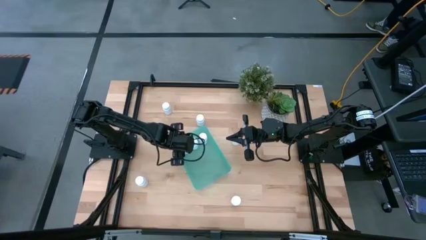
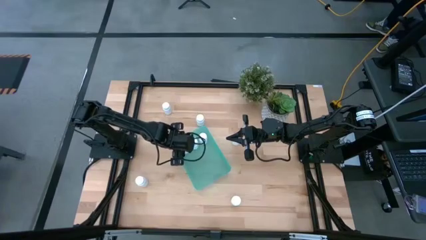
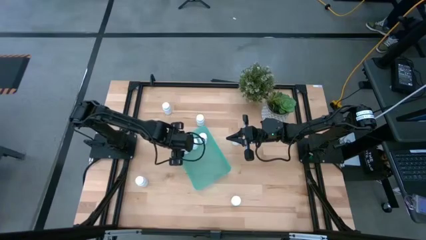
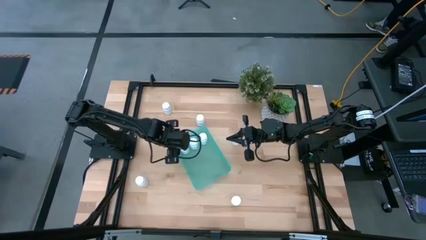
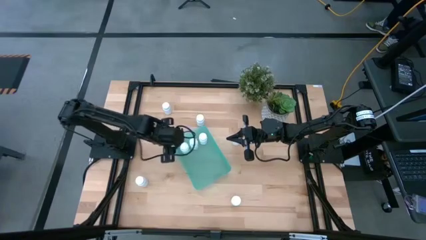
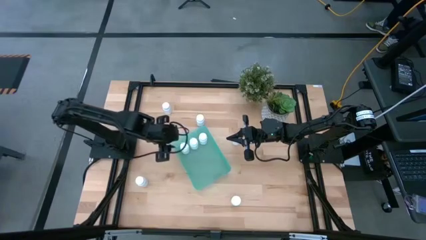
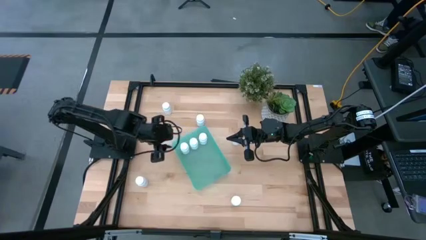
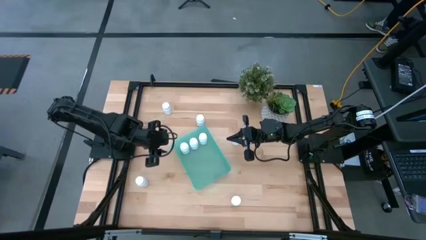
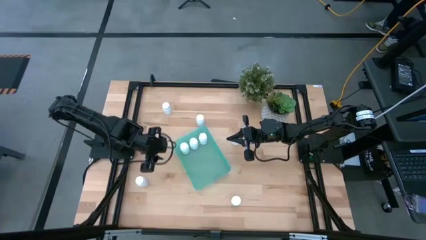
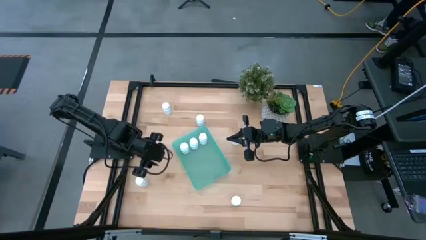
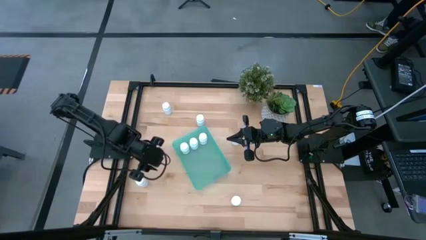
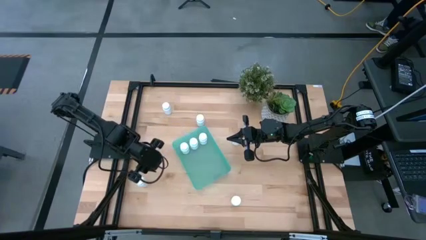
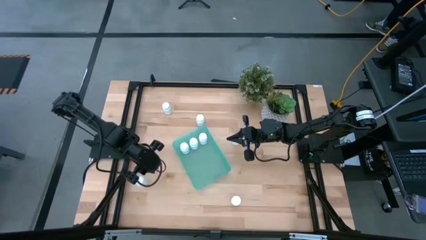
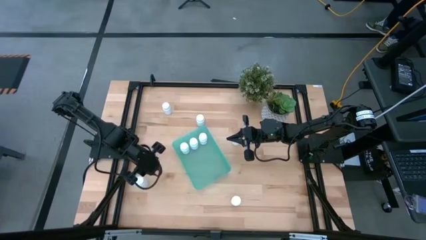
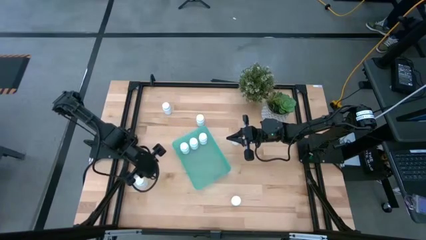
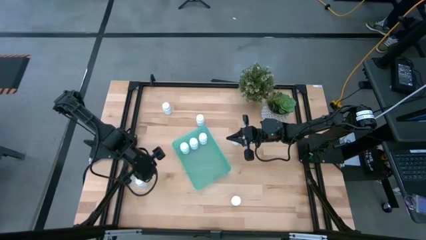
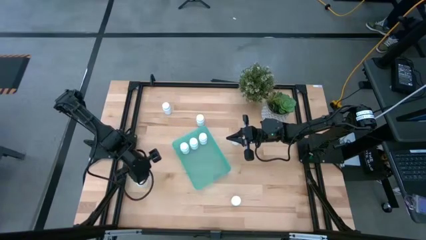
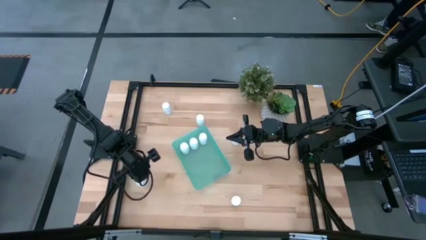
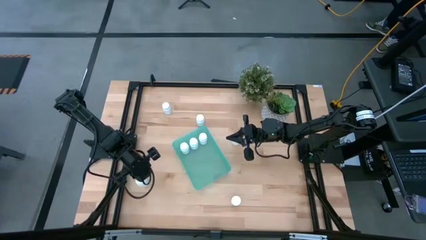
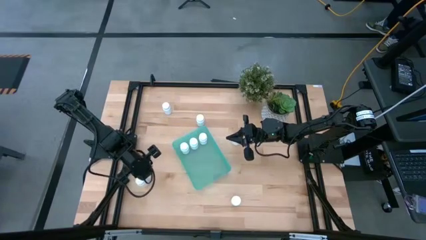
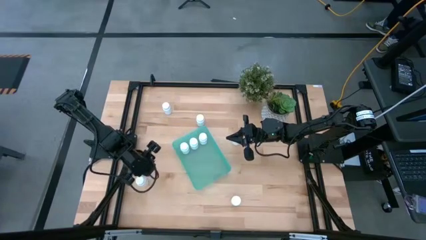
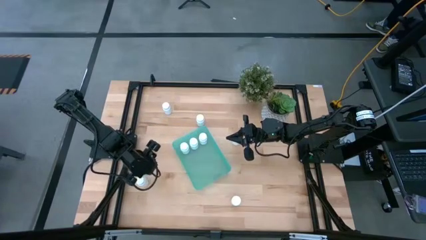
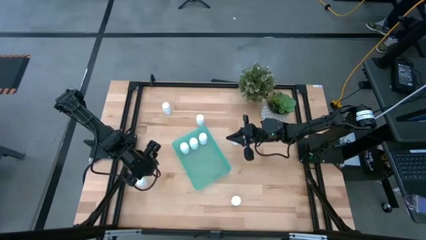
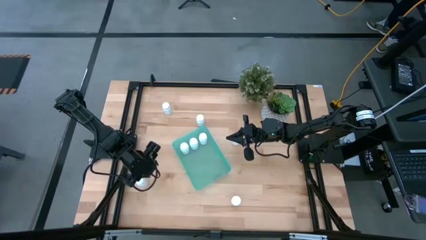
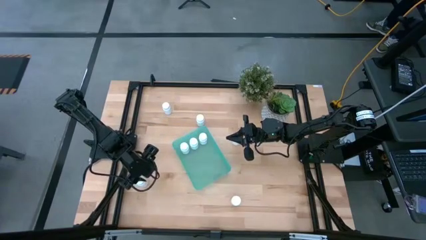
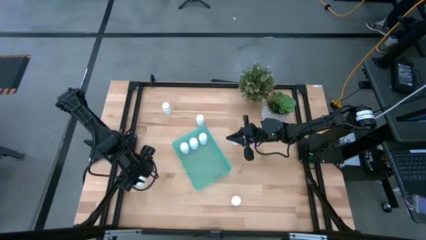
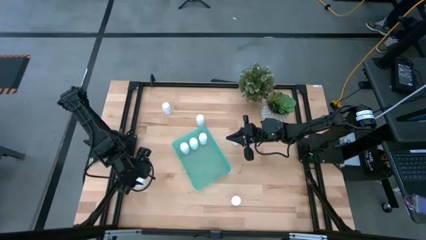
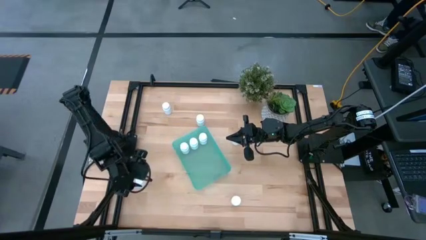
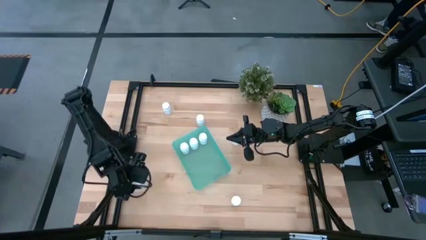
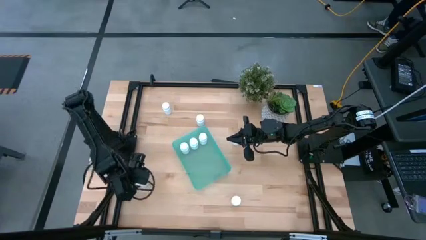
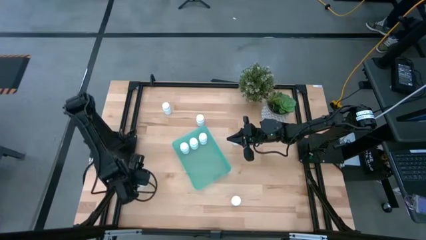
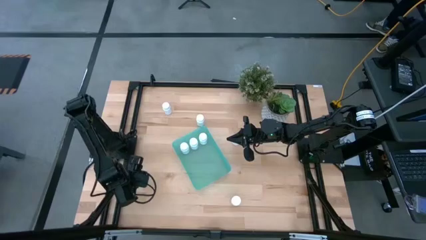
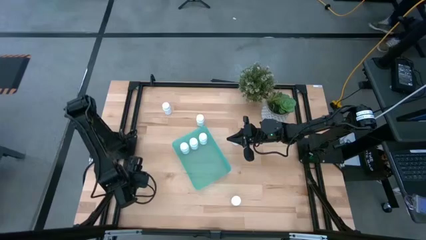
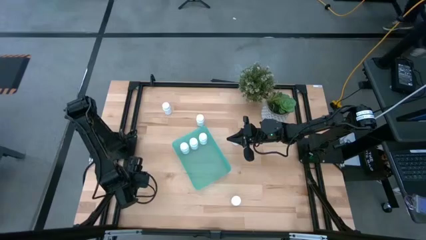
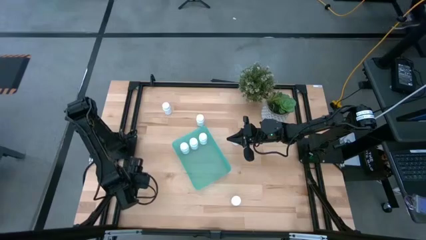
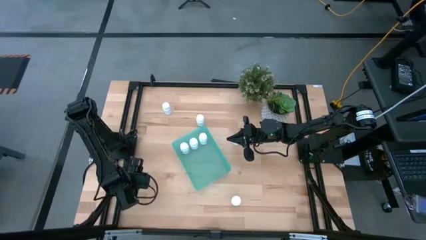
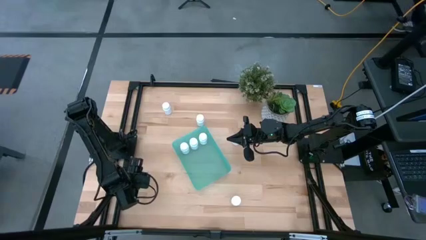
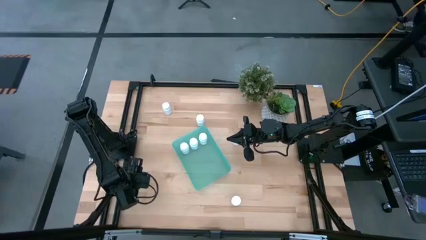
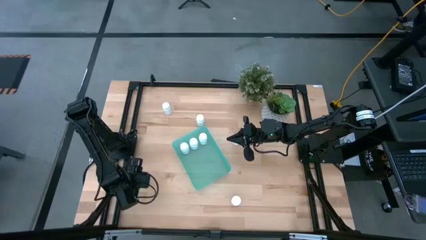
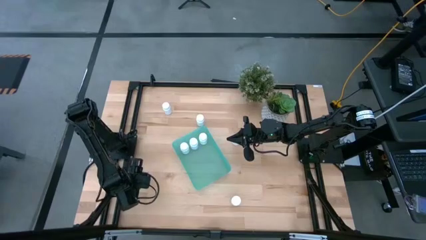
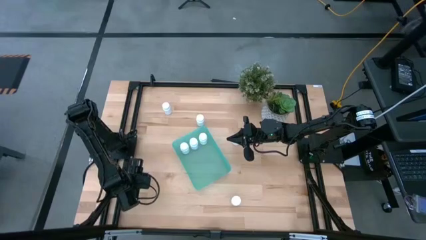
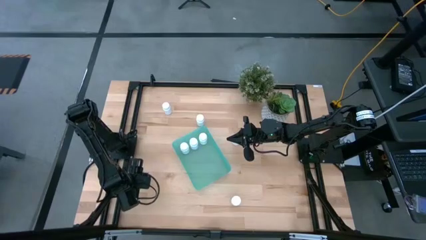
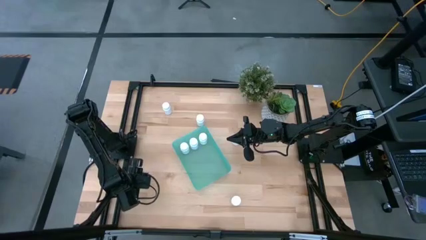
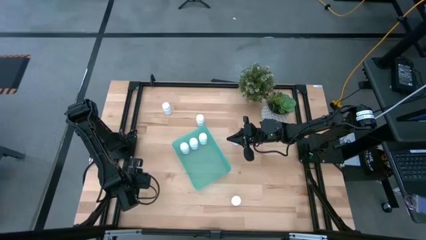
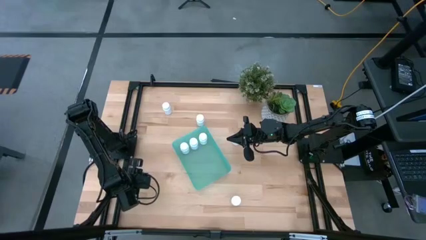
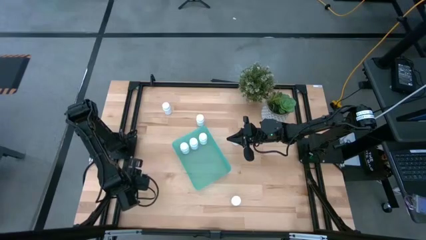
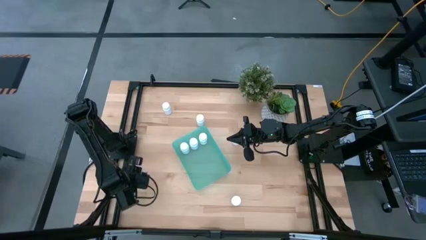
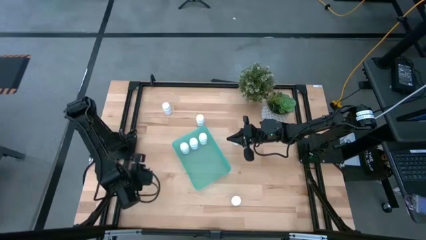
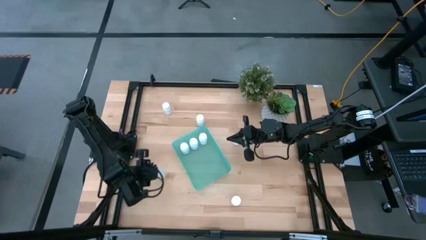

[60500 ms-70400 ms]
Task: Pick and place pill bottles into a basket
Put the white medicine bottle into the green bin

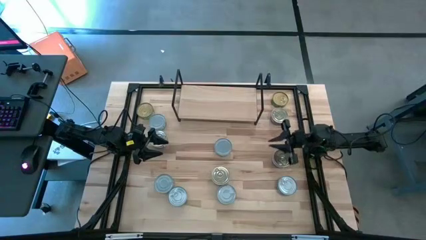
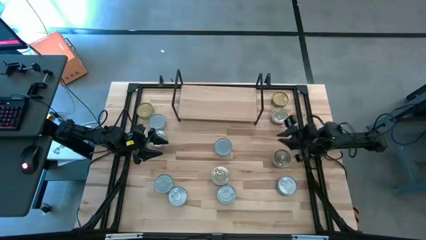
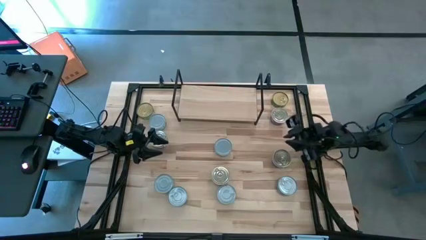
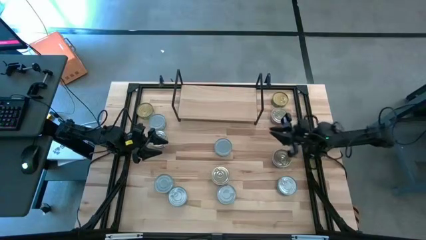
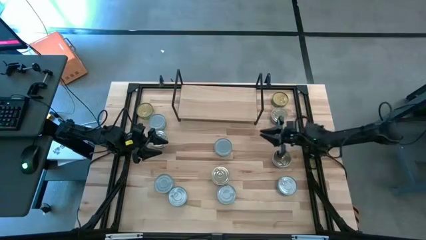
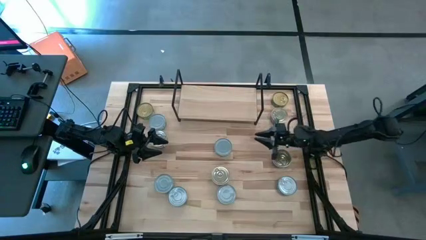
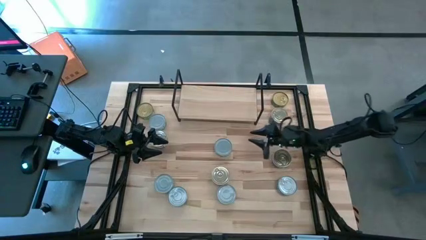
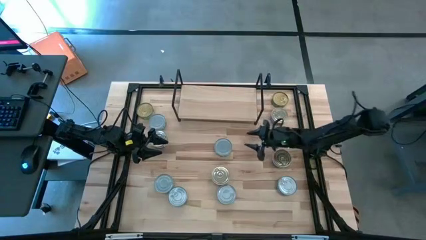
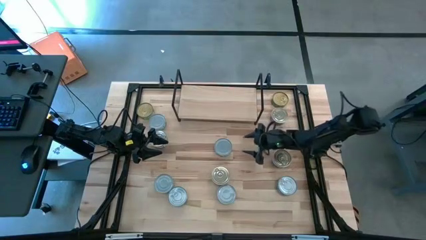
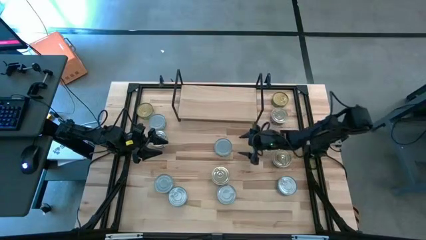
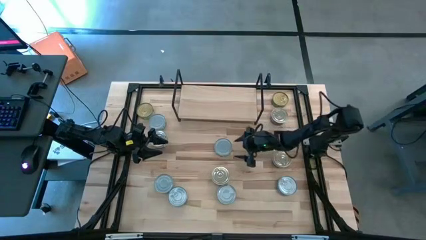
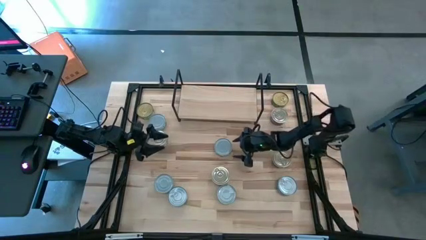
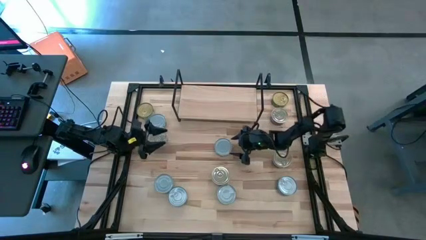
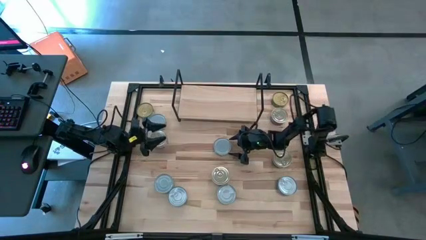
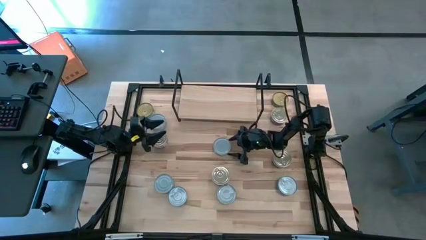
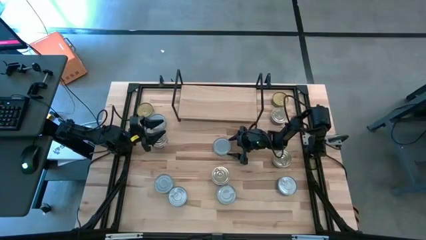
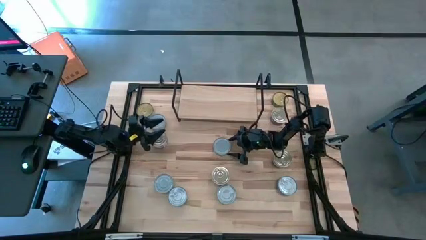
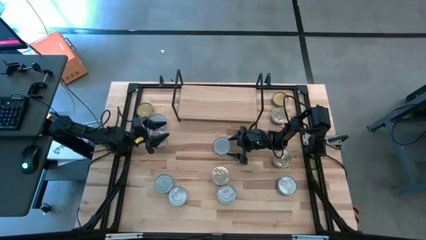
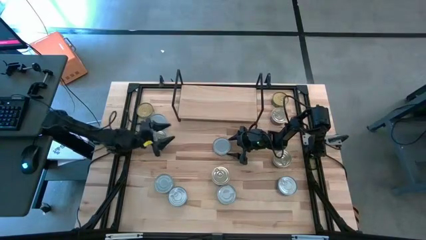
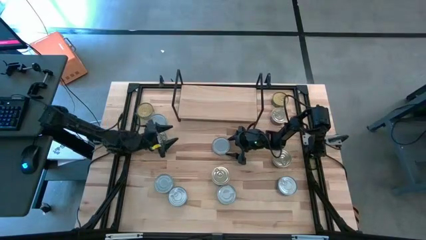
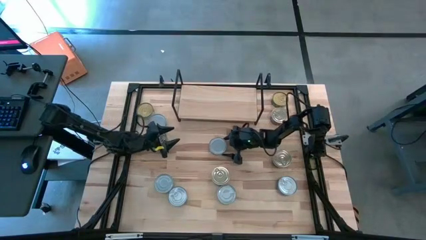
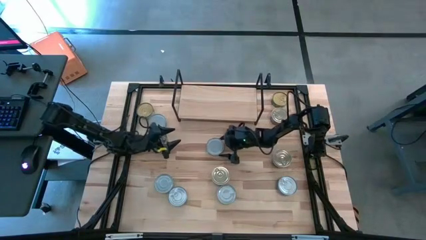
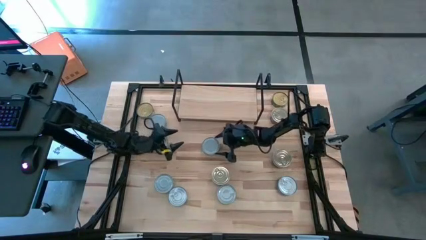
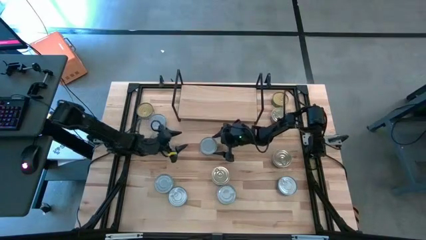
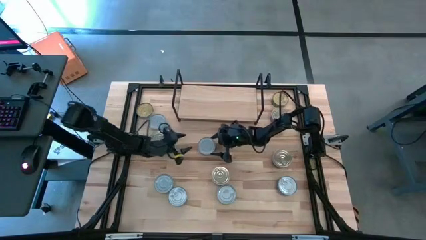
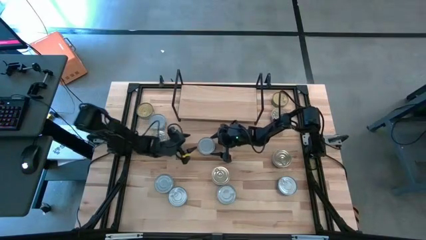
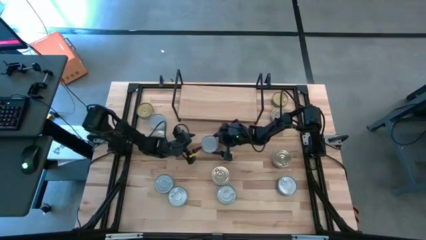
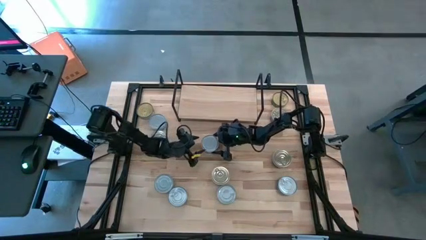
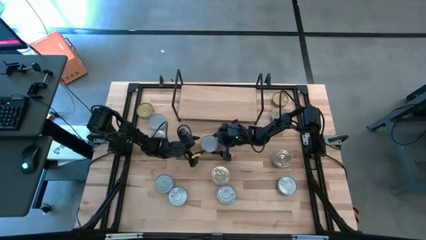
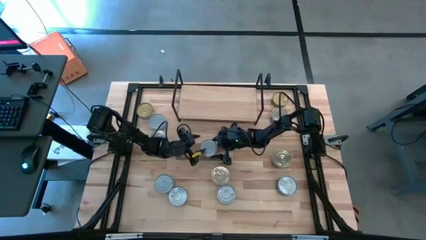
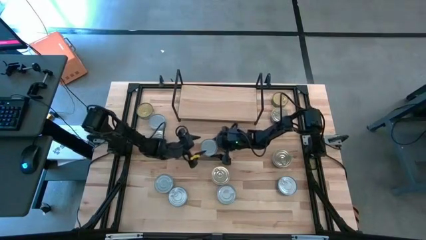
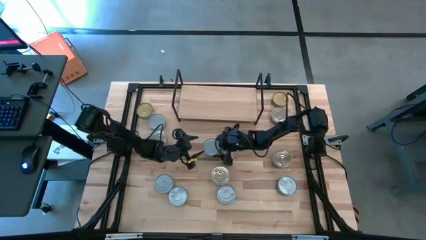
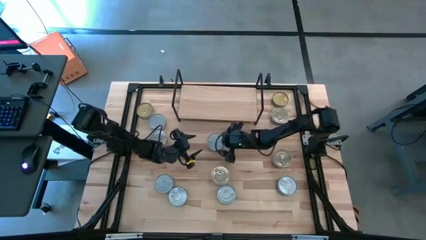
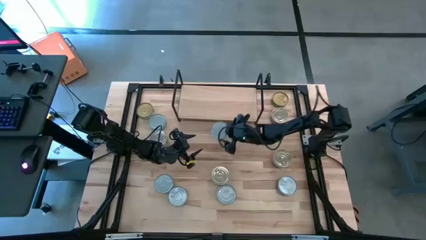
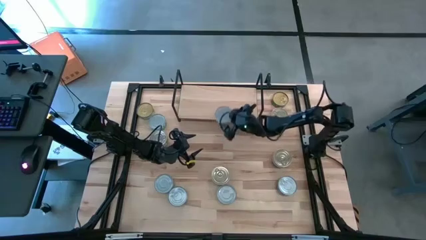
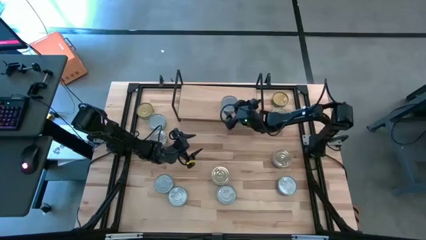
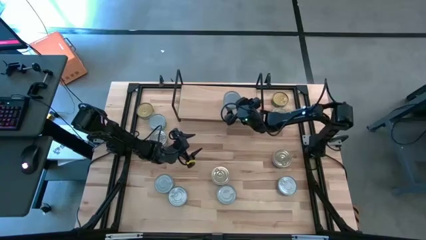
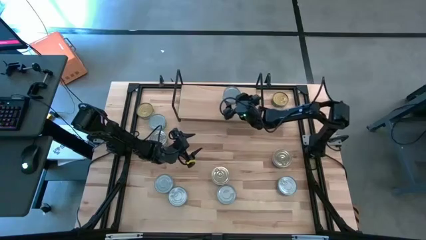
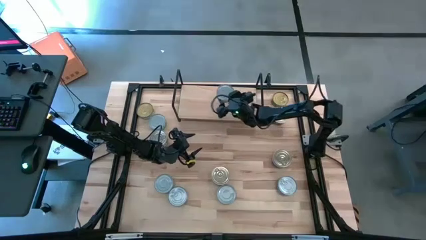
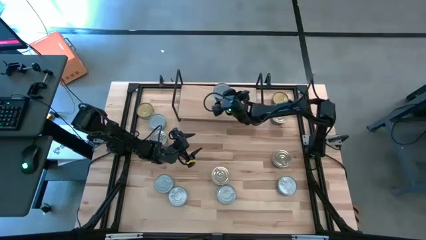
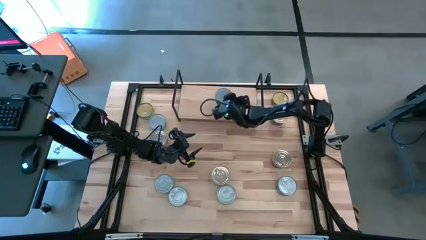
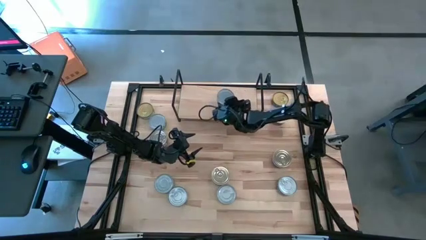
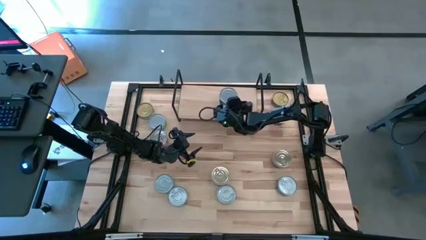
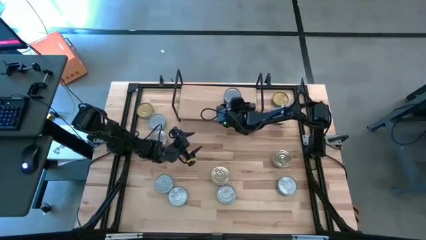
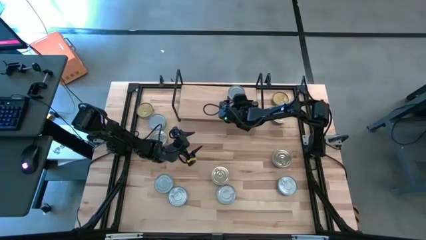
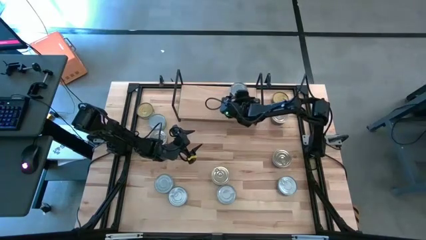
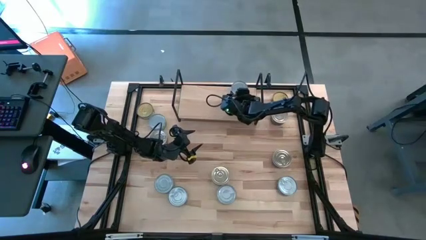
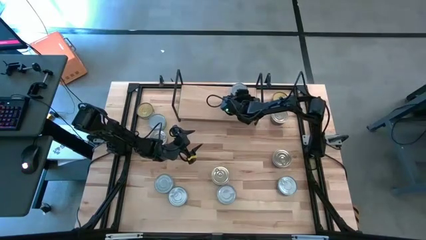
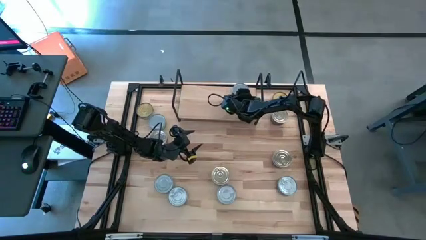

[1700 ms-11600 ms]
Task: Stack canned seafood by type on shelf
Put the green-white tuna can on the shelf
